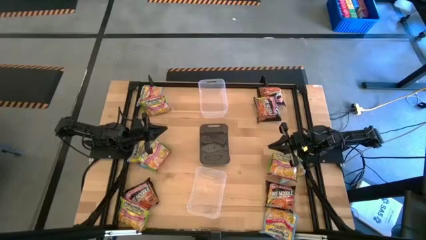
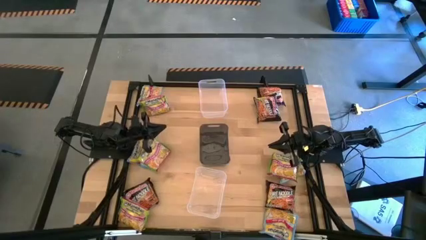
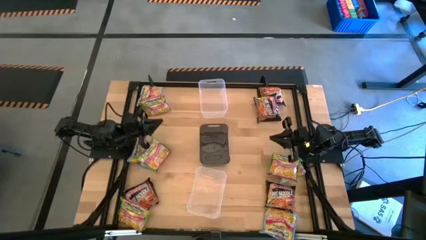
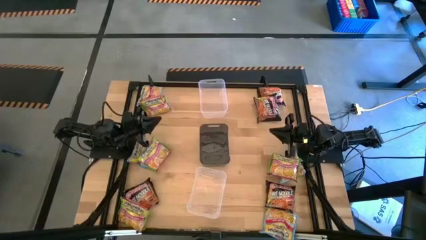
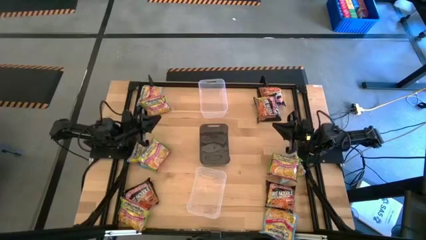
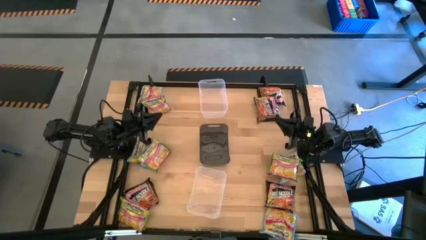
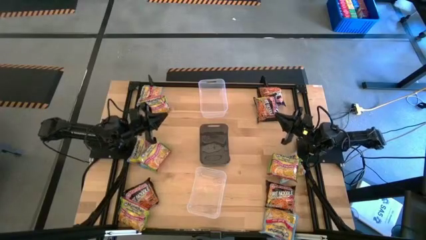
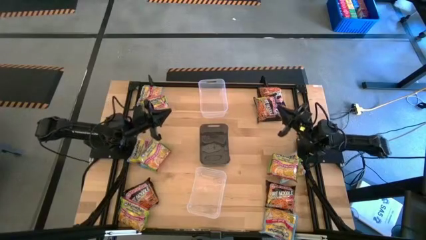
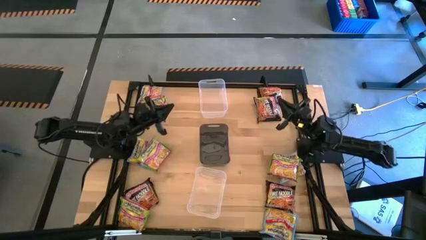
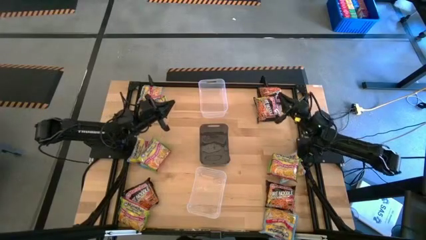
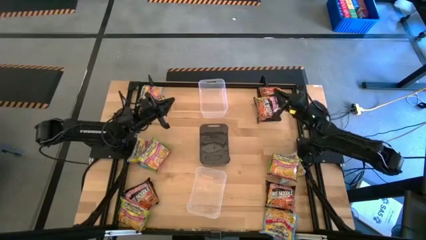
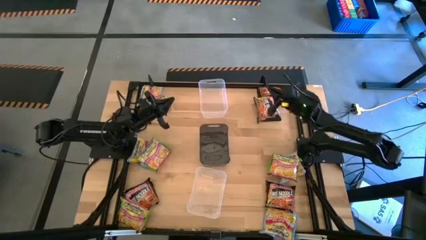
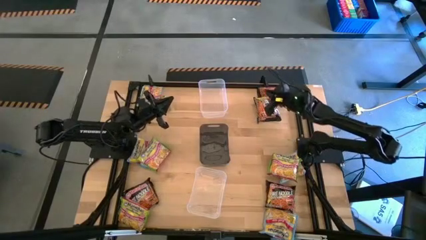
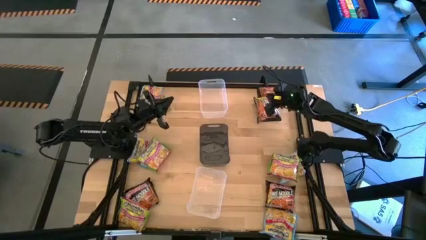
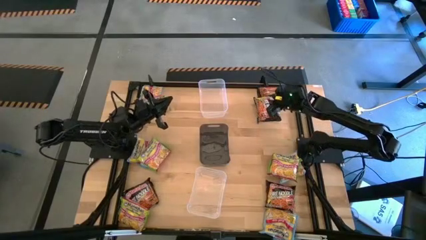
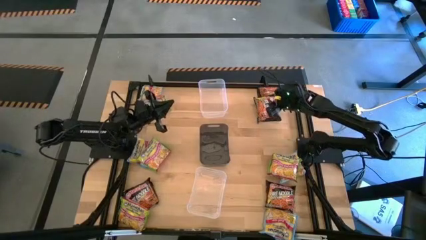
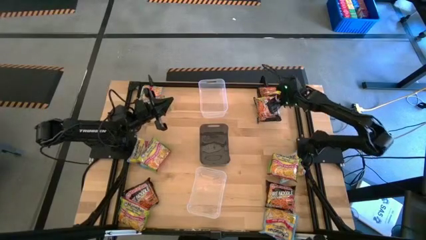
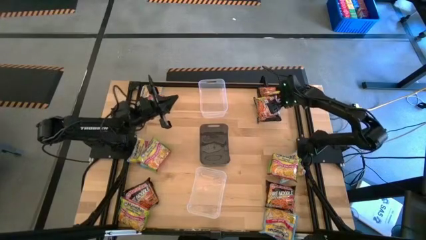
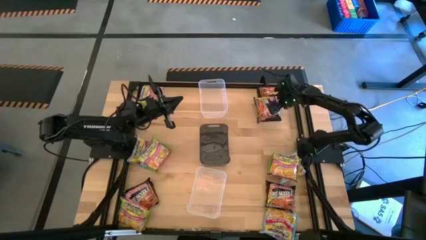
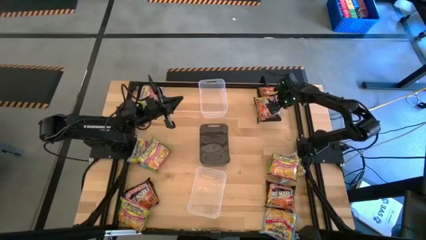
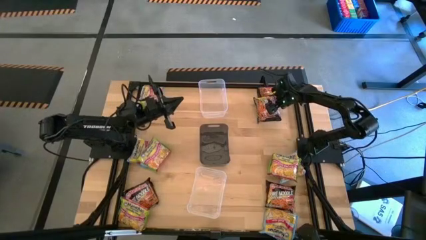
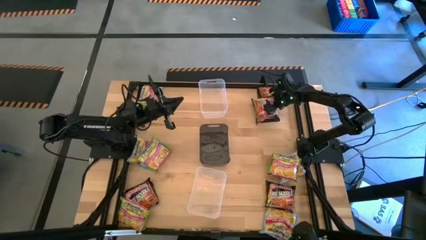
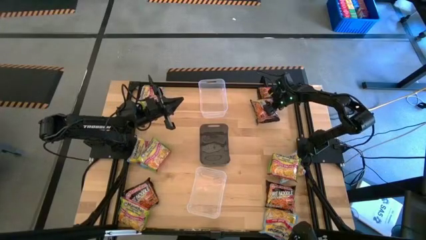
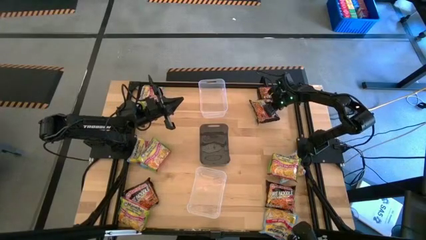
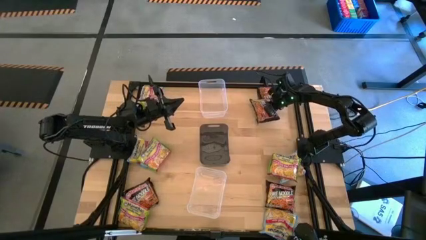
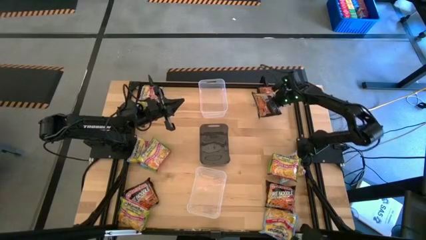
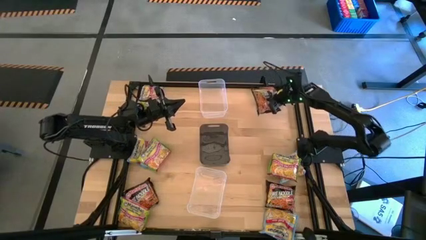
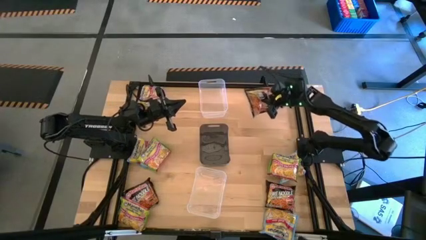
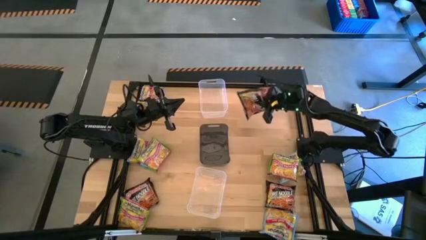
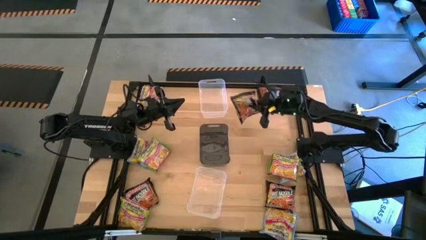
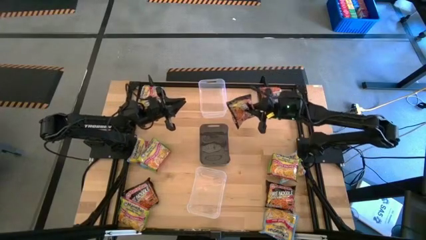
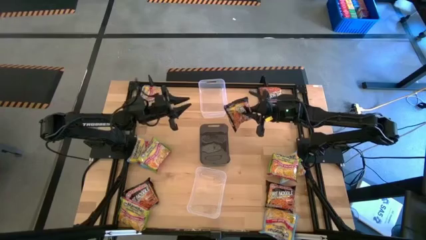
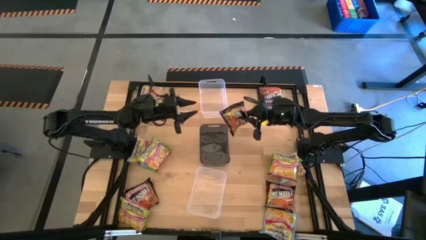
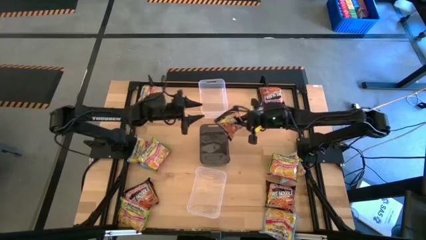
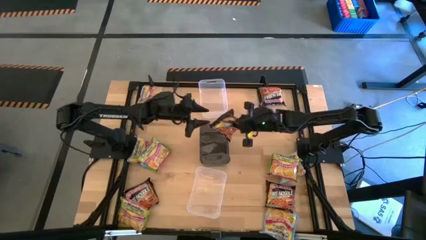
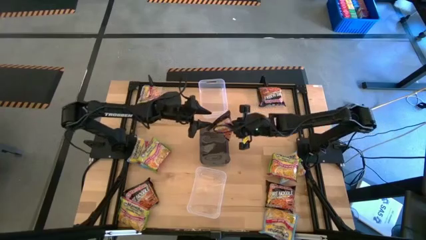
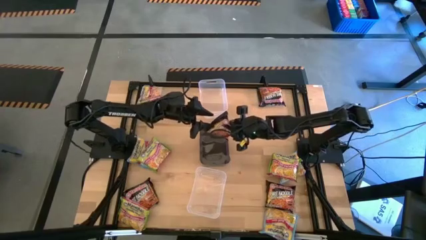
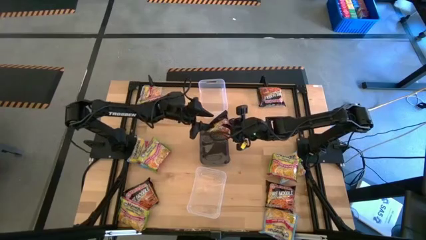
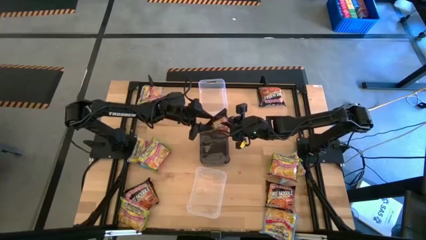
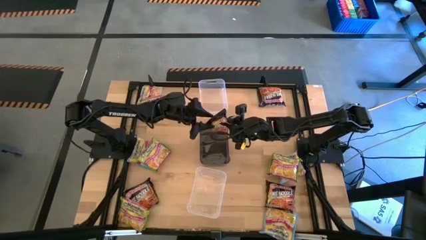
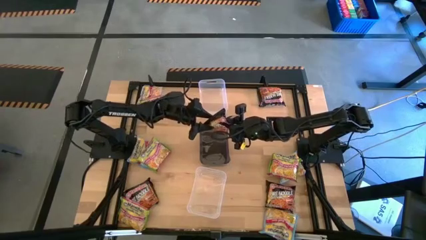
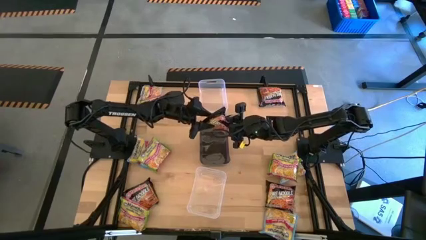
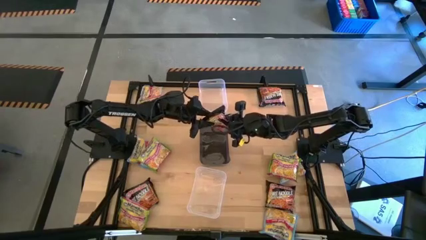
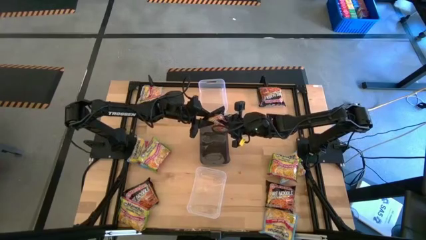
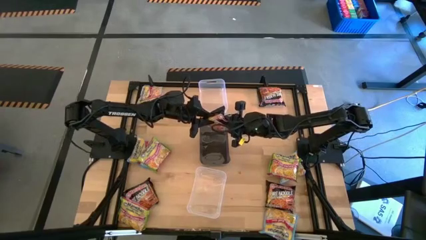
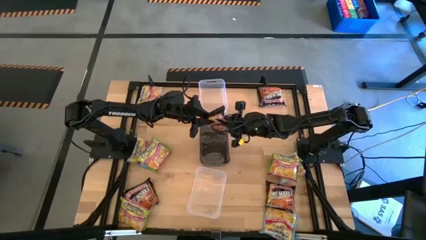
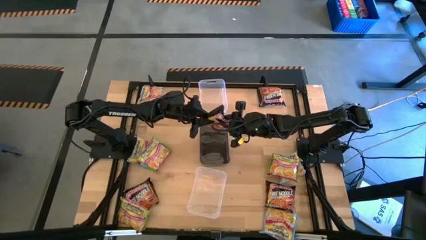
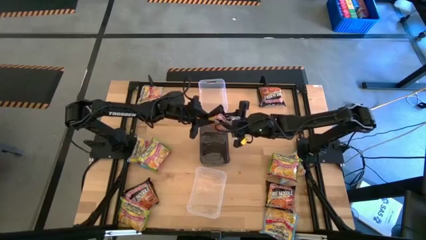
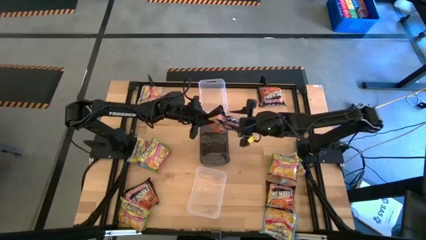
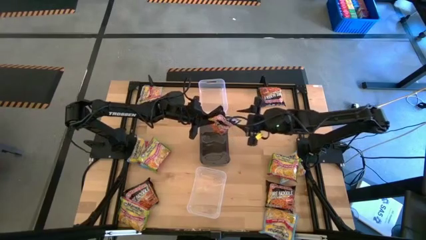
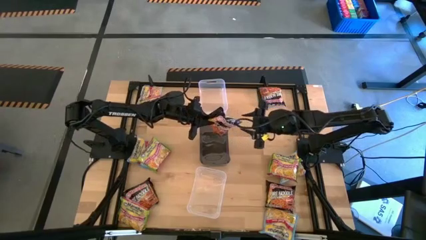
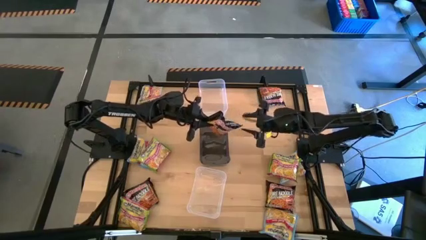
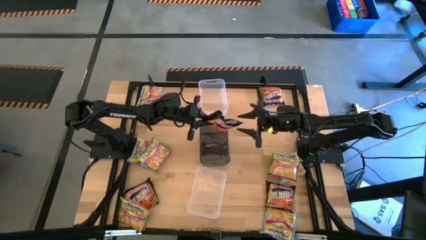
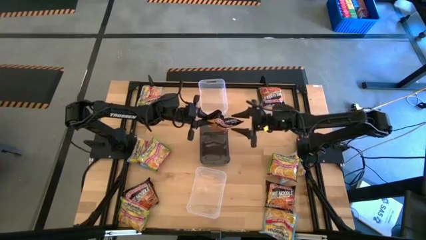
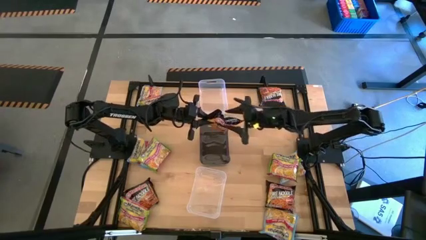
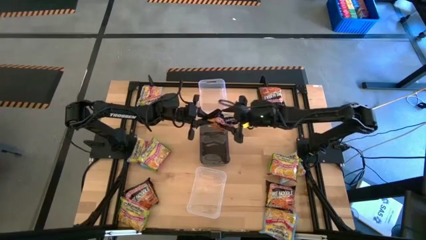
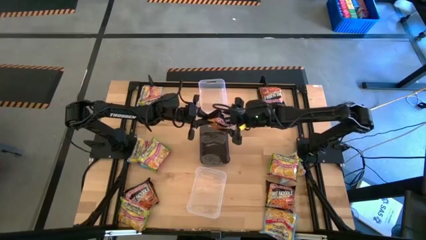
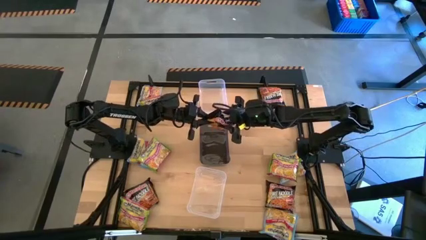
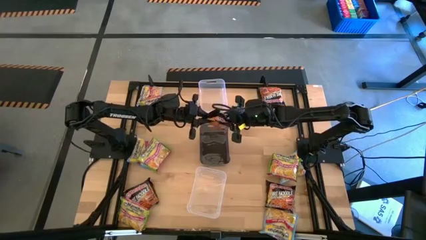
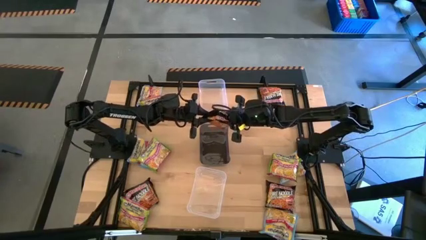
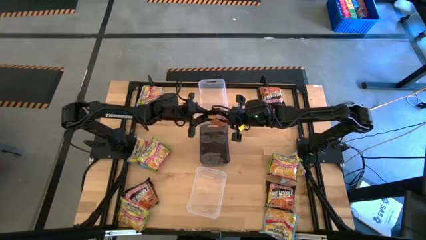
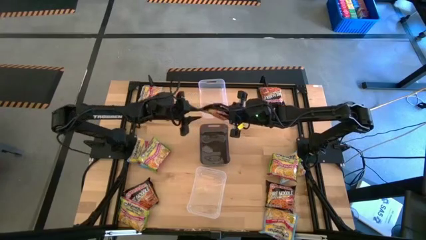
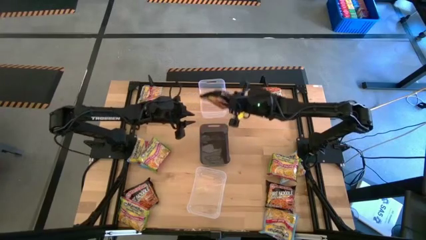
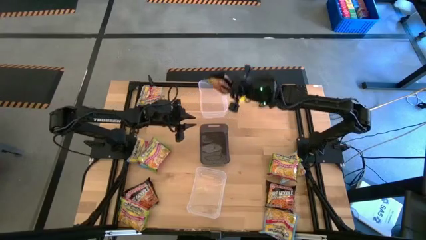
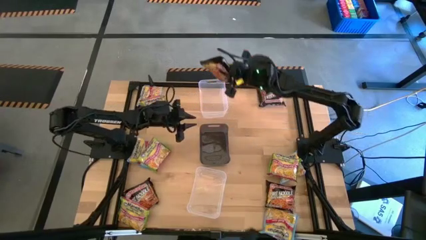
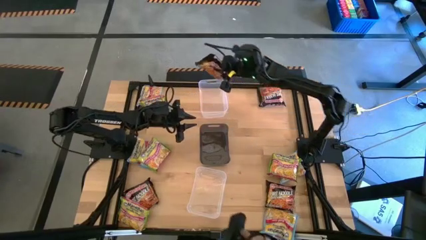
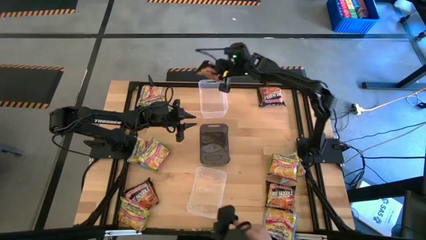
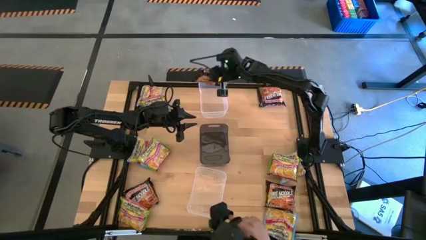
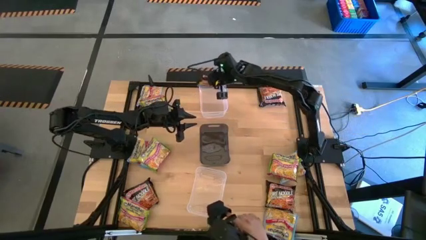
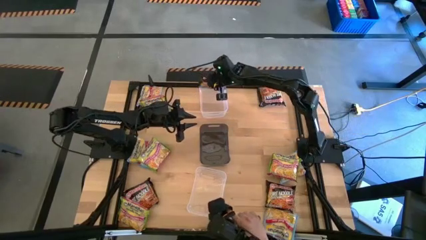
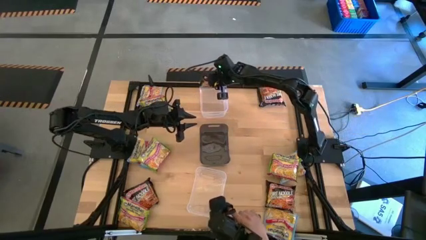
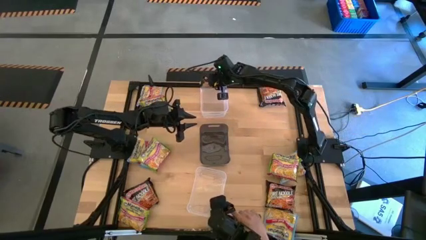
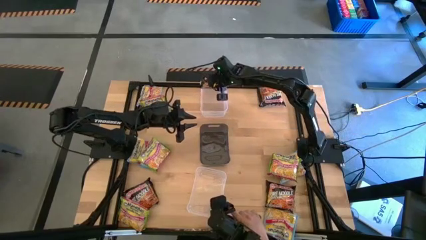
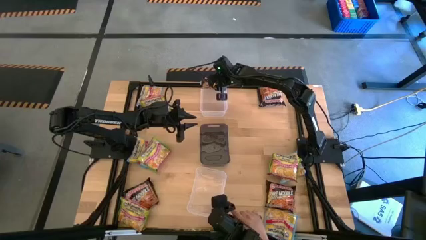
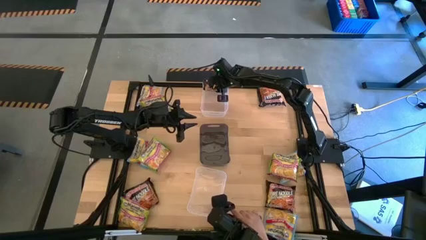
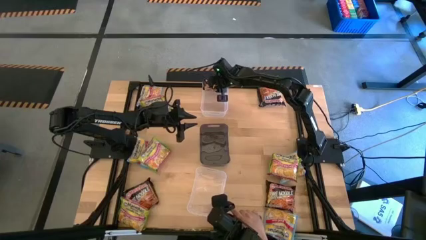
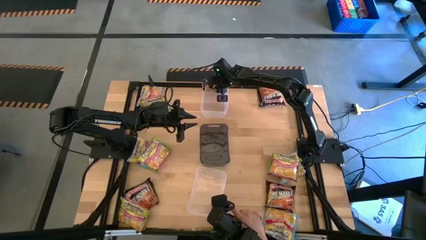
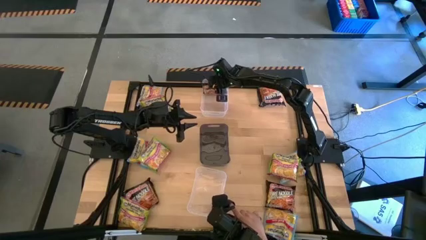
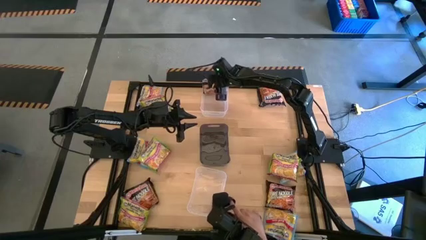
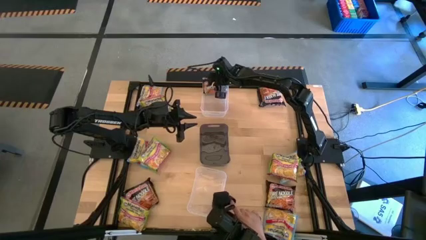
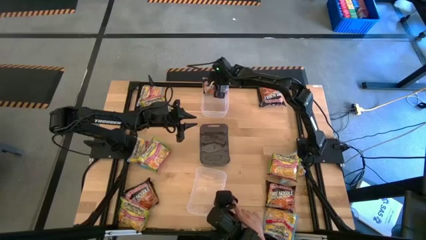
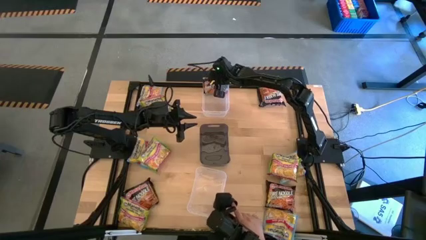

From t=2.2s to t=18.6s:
Task: Sort Maruchan noodles
Put the black noodle pack into the top transparent bin
